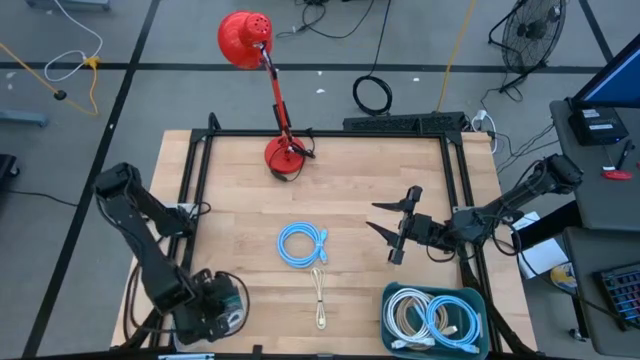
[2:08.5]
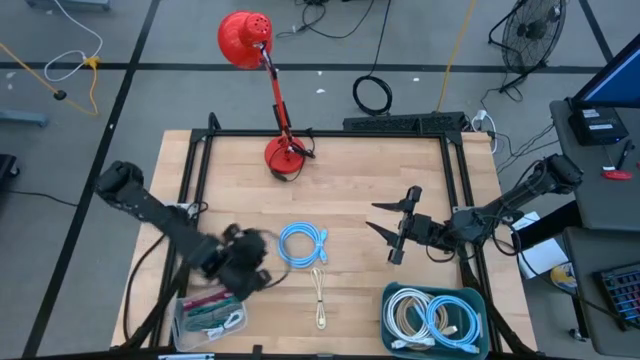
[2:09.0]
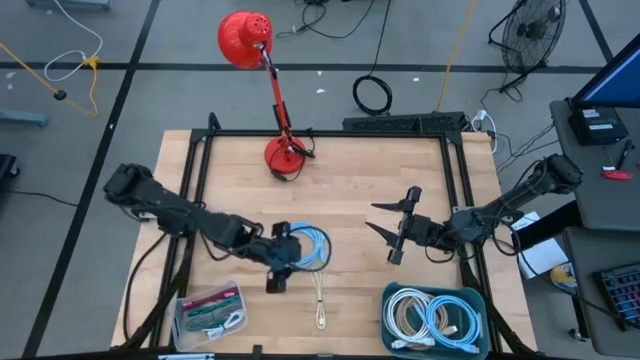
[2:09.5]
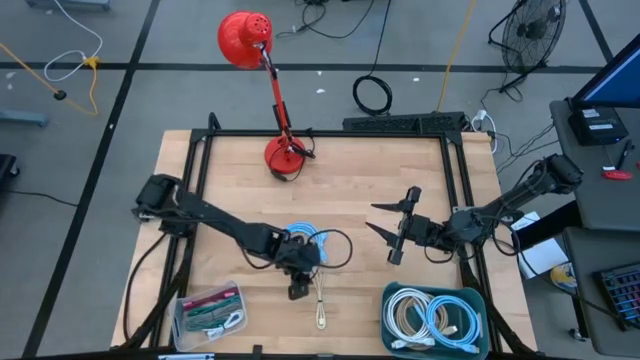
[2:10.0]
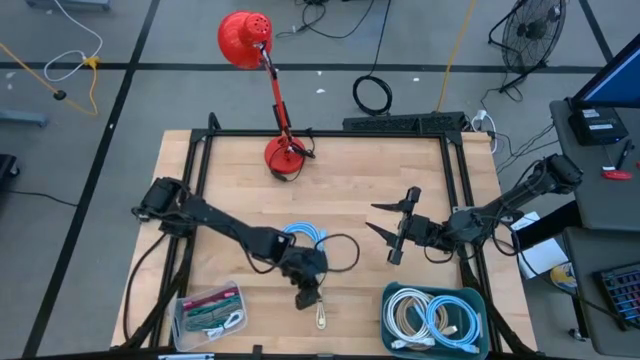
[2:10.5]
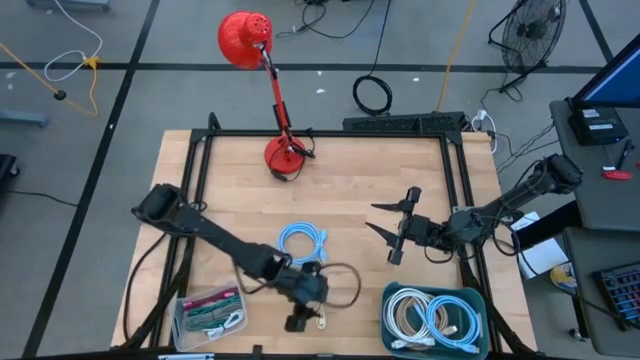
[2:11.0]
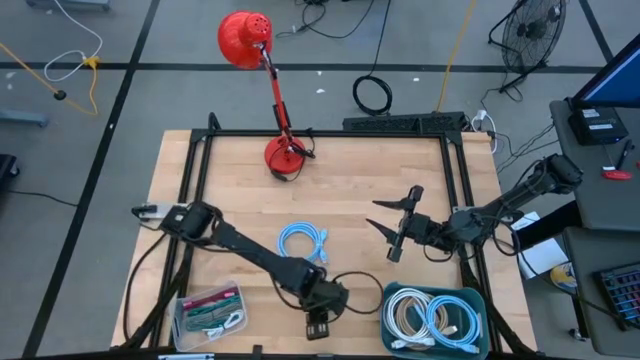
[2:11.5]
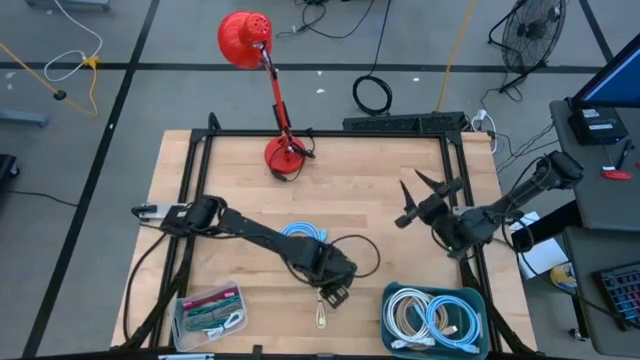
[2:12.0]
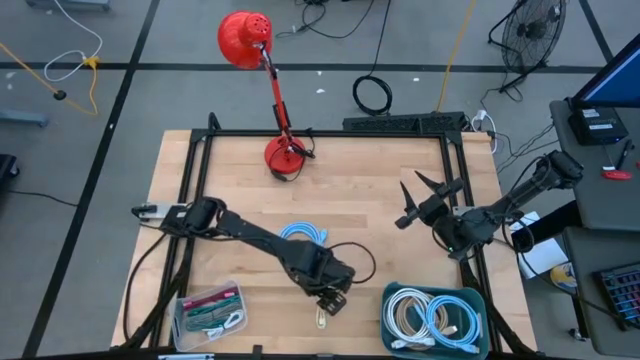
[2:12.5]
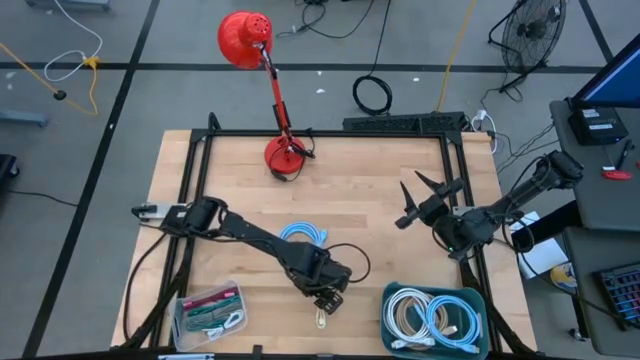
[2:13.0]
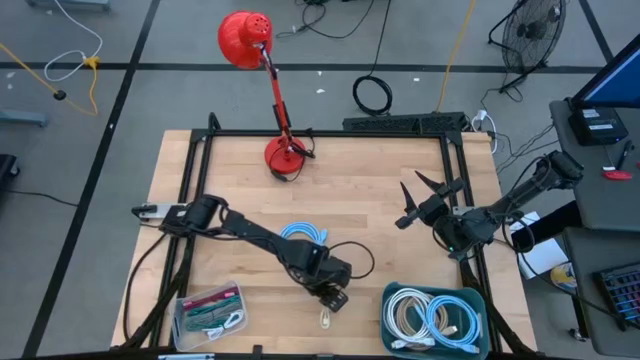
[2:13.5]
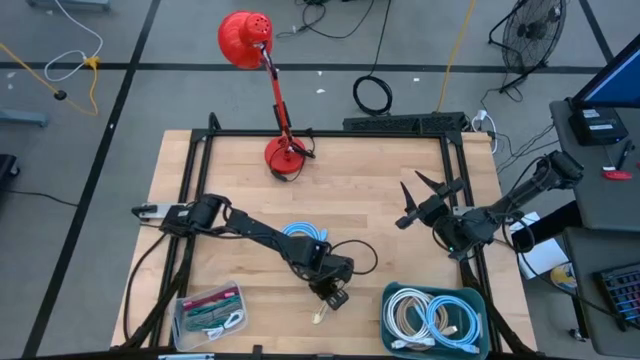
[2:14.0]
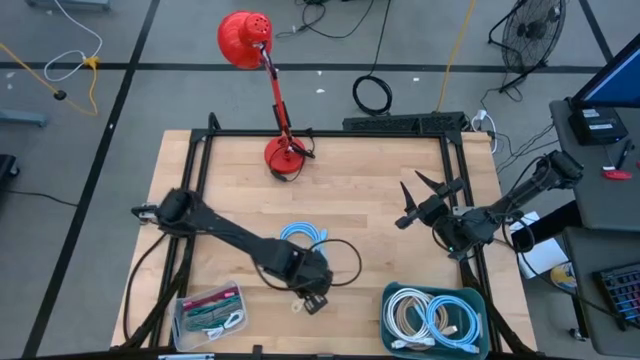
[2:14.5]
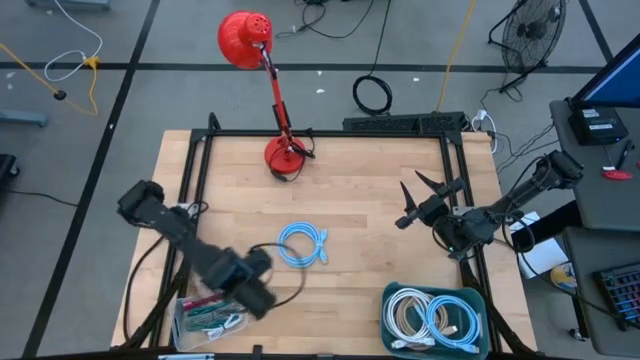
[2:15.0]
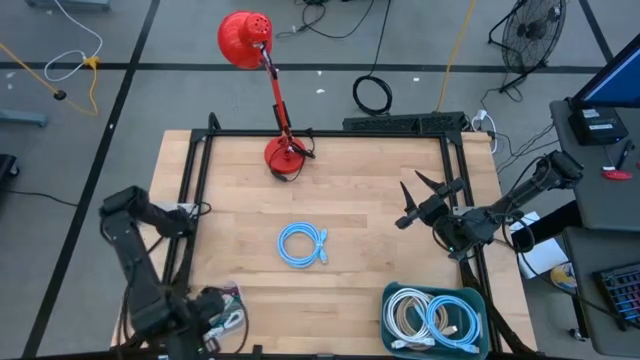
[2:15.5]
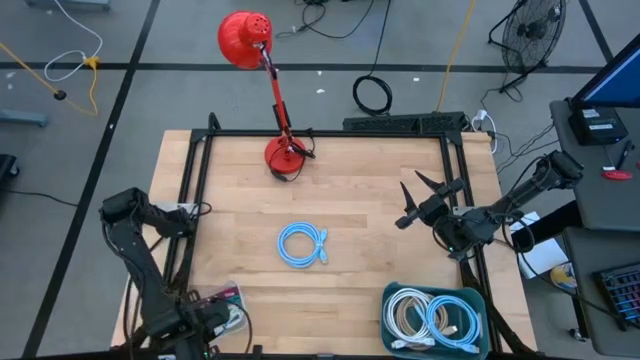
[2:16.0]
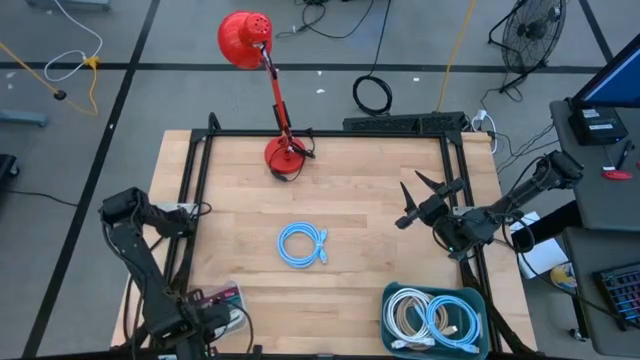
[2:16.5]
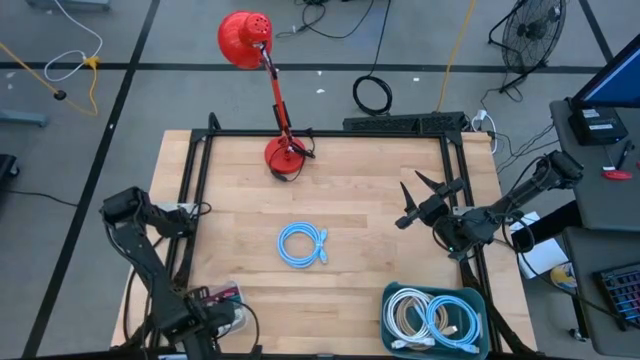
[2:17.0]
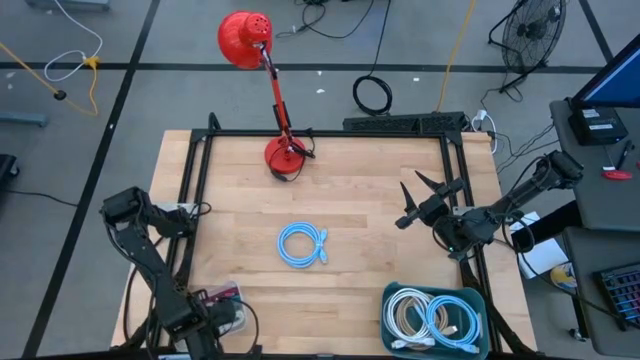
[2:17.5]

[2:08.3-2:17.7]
Task: Pick & Place USB Port
Put the white brown charger cable into the transparent bin

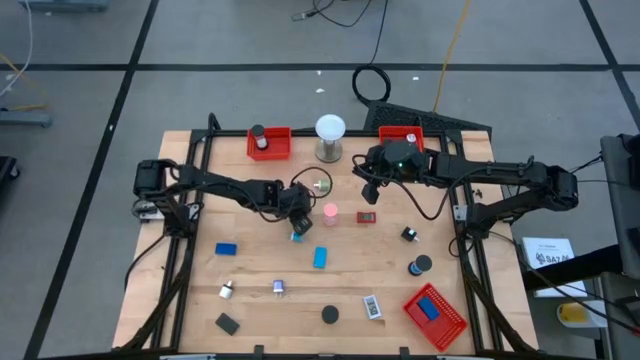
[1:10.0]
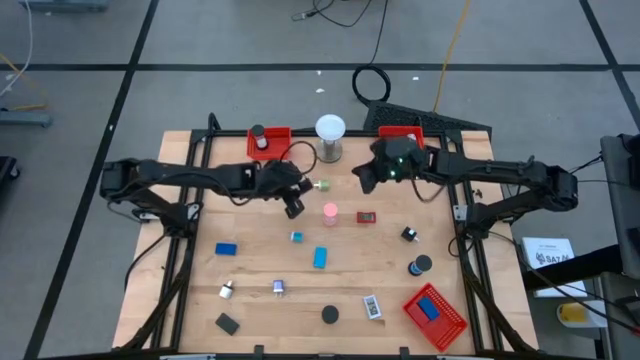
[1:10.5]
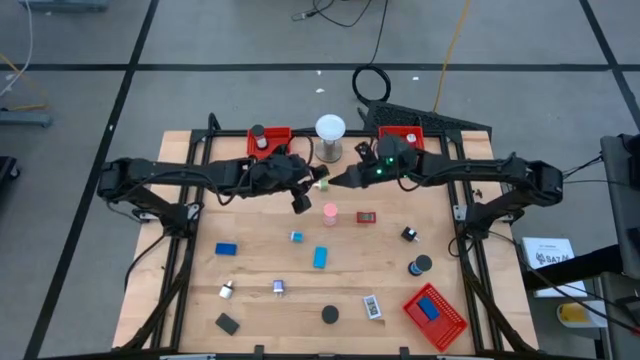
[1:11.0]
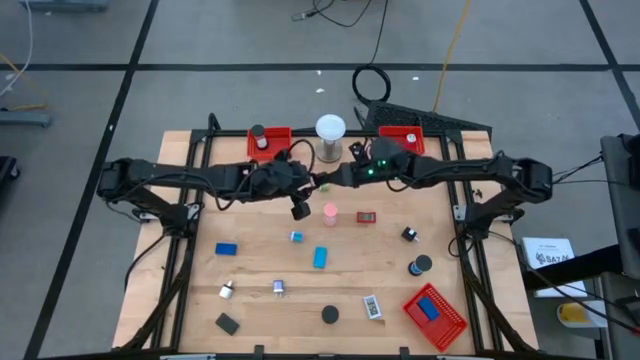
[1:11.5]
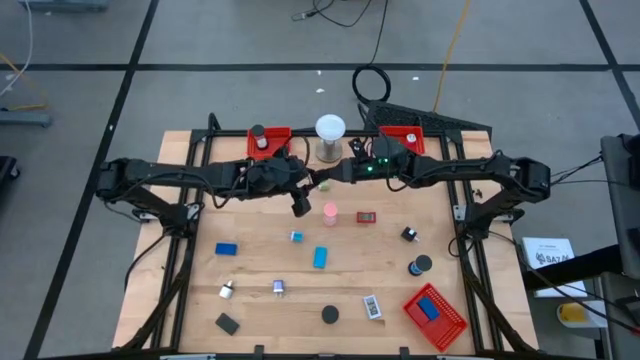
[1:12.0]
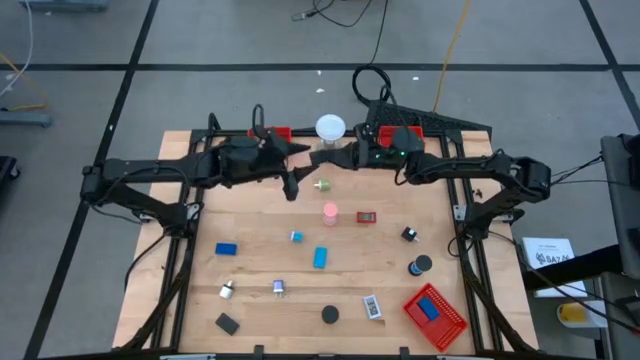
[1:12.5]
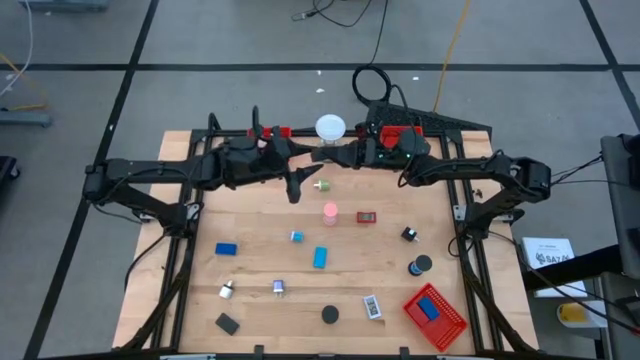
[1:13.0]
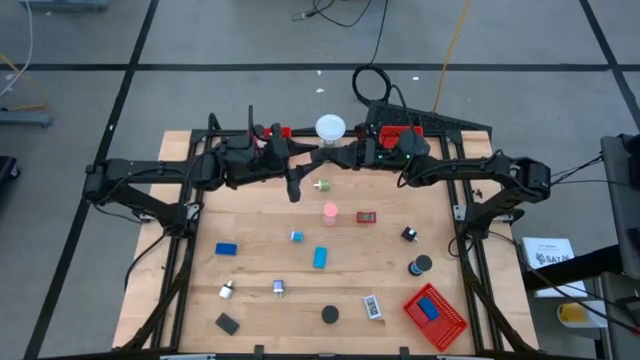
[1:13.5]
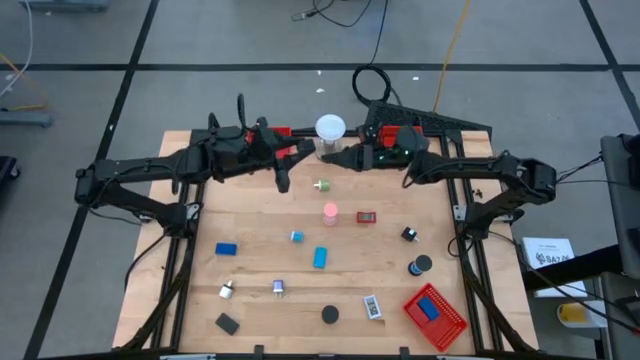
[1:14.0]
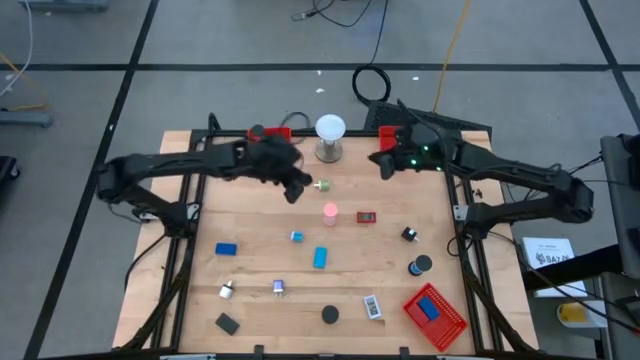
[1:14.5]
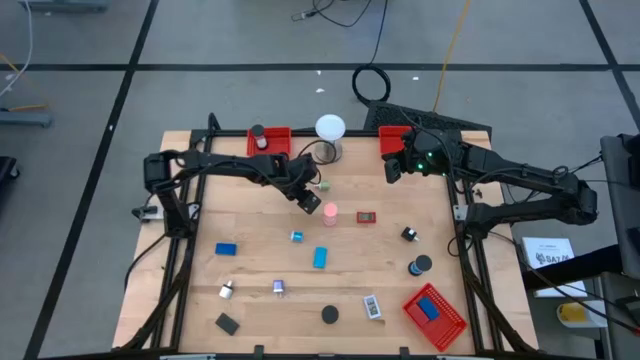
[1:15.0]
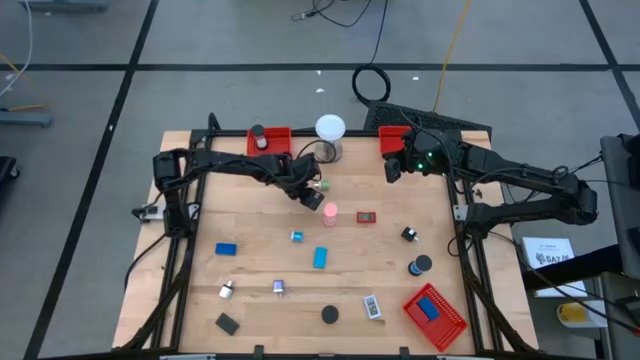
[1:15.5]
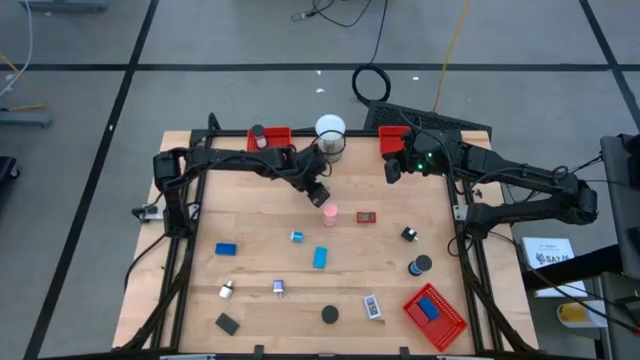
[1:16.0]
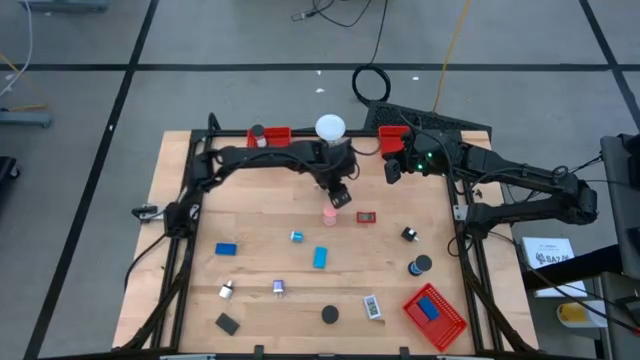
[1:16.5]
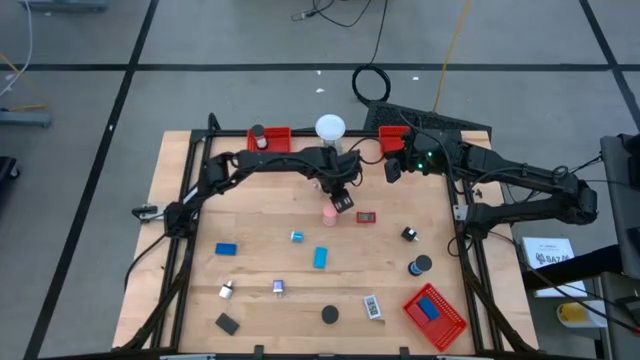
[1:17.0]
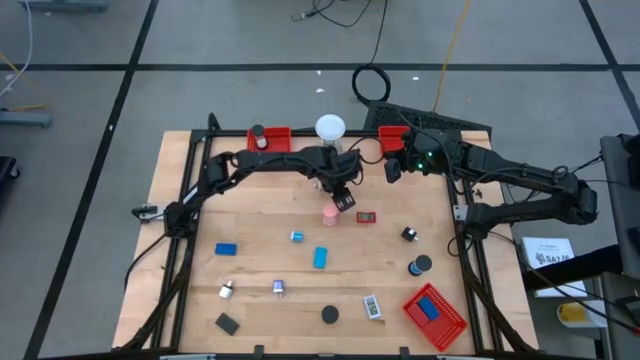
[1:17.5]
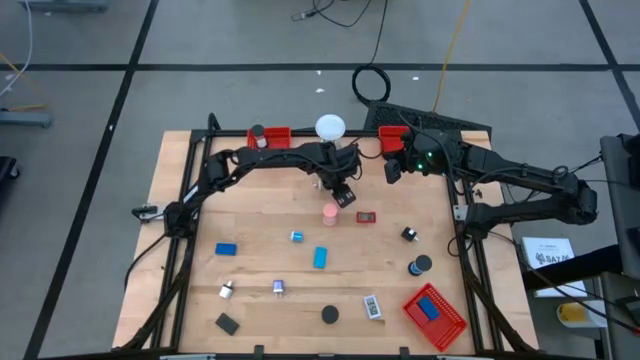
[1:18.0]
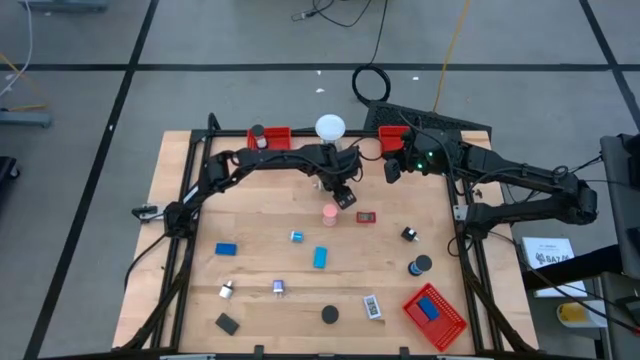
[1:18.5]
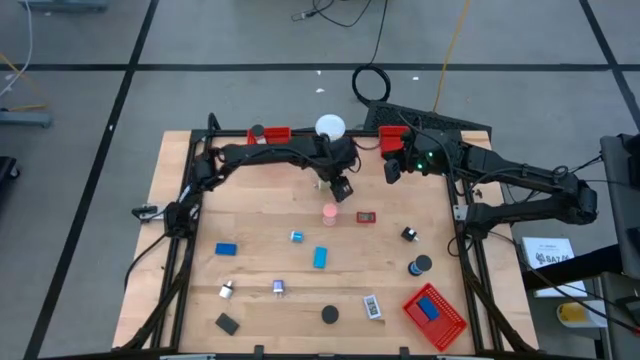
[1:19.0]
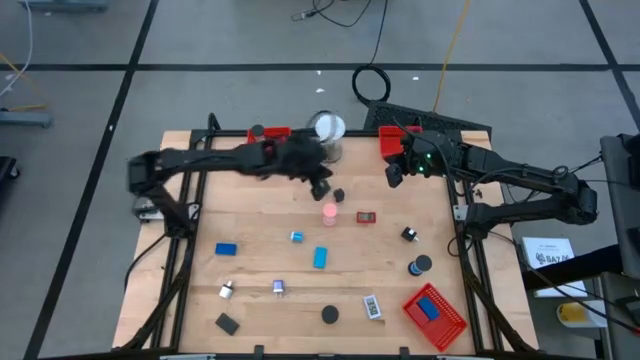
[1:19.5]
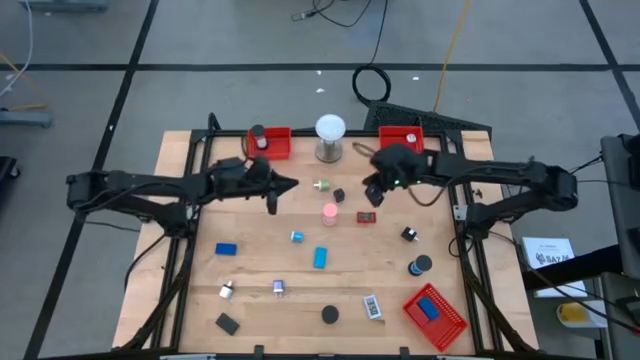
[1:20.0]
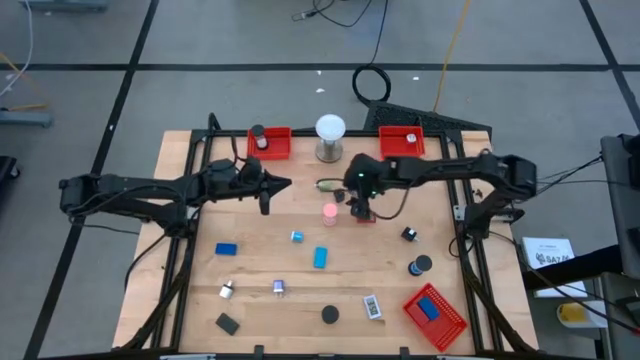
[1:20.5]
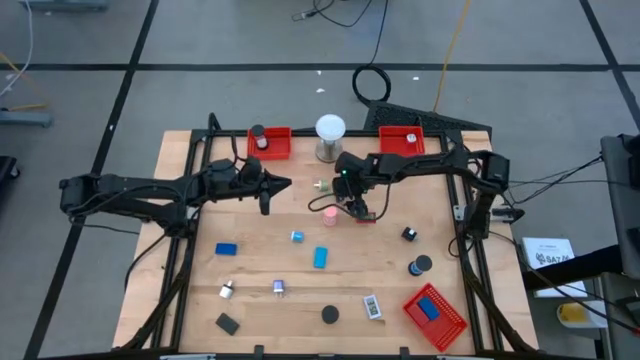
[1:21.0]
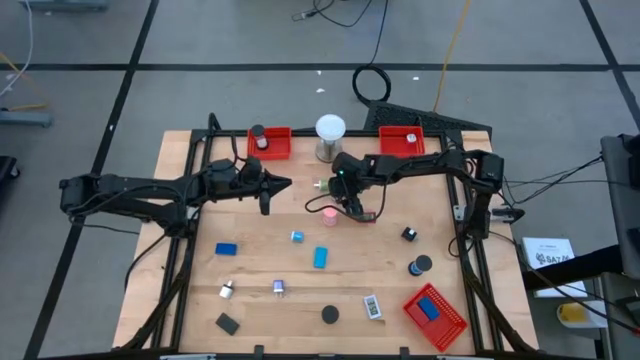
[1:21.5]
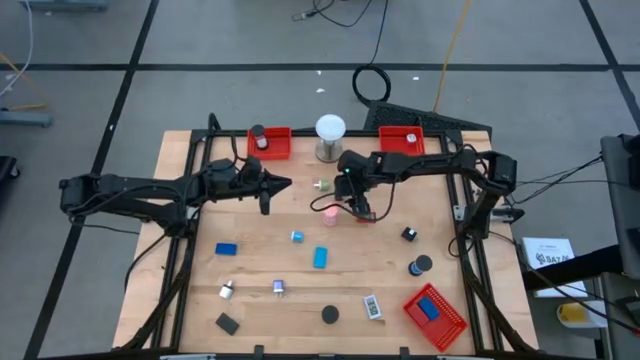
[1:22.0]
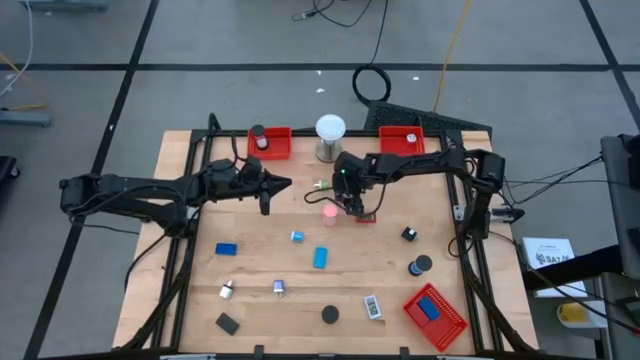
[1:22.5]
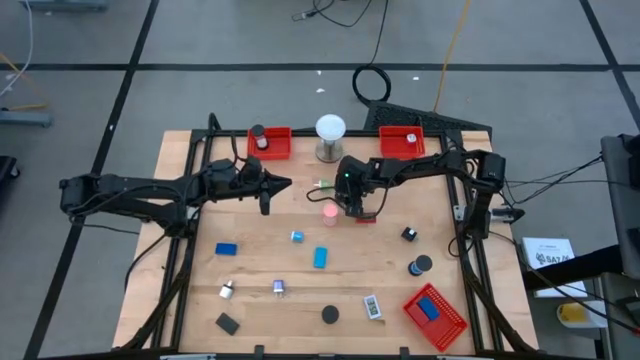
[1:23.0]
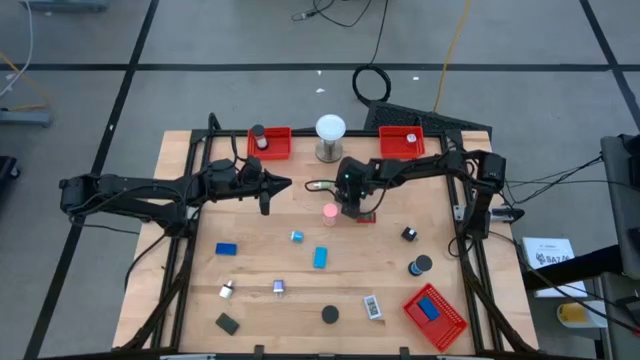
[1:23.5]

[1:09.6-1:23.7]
Task: Pick & Place Office items
Put the black charger adapter into the top right red bin
